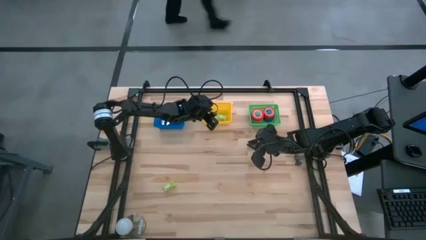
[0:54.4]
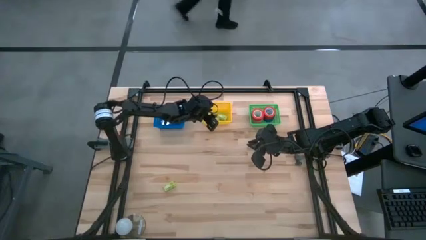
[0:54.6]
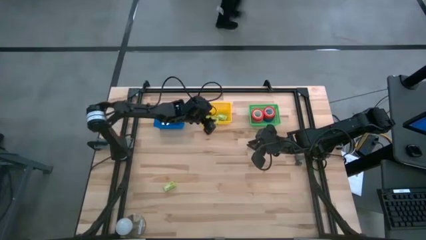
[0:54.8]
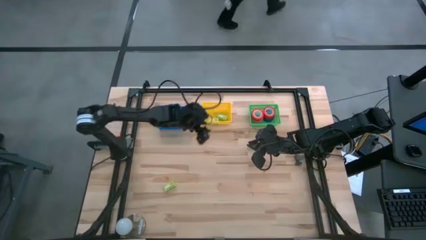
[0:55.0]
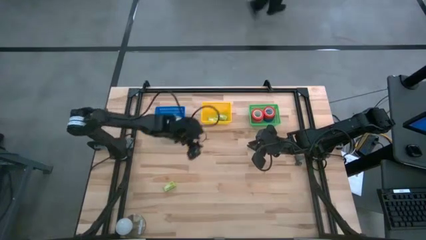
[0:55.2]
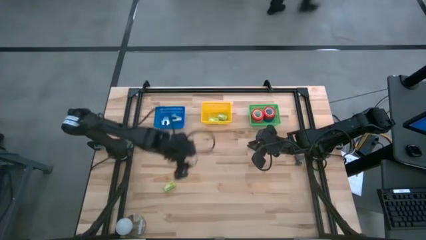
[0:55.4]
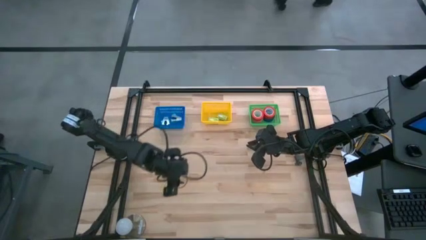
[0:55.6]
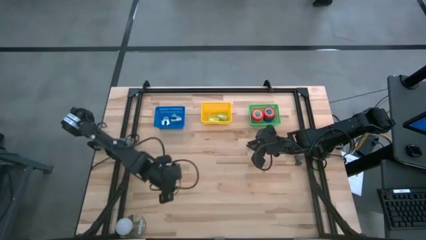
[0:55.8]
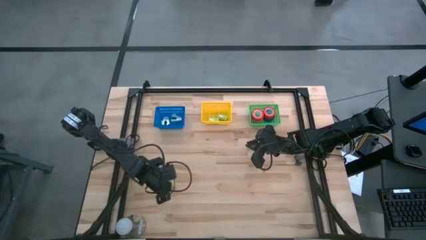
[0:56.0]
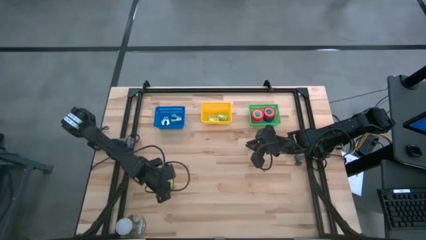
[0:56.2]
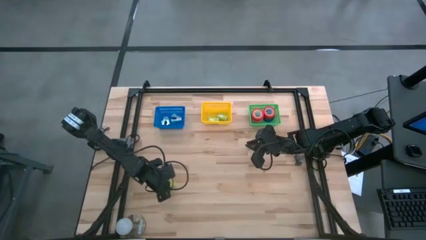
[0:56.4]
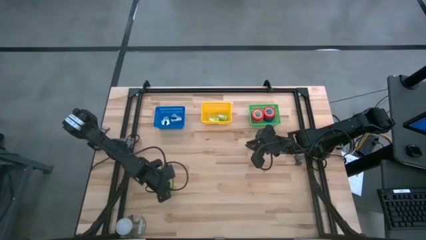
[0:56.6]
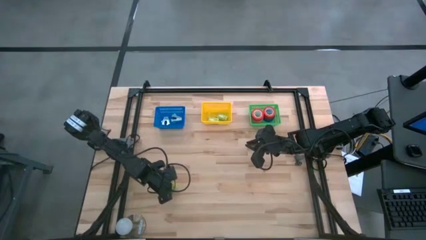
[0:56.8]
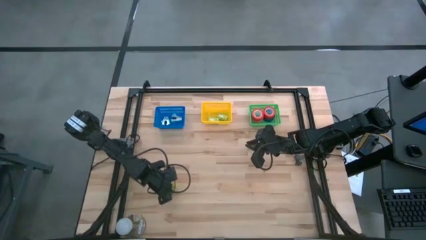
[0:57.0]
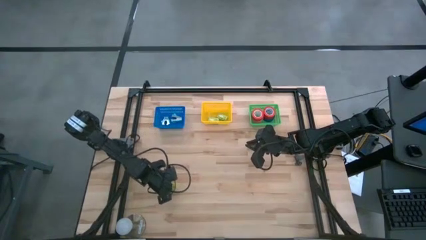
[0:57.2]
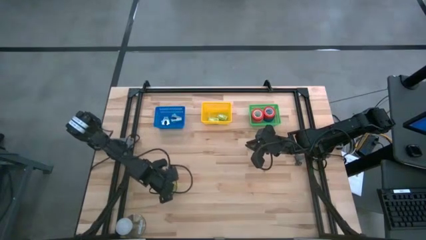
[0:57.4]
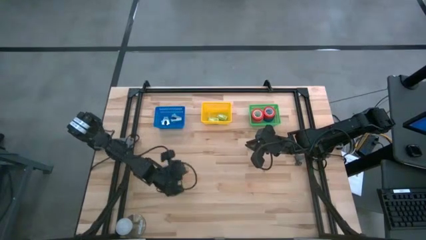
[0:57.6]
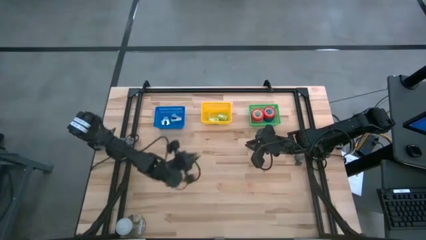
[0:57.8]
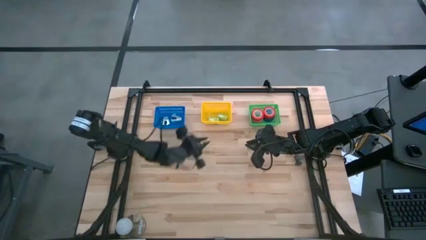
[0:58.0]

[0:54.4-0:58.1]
Task: Pick and place Stapler, Stapler remover, tape
Put the green staple box into the yellow basket

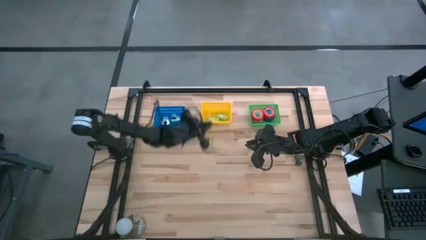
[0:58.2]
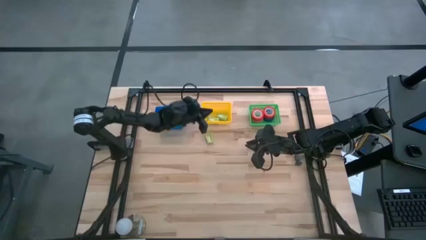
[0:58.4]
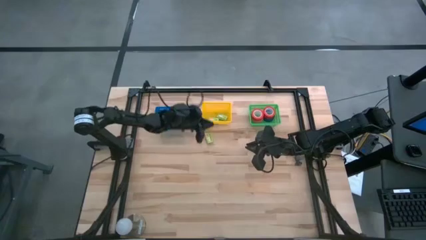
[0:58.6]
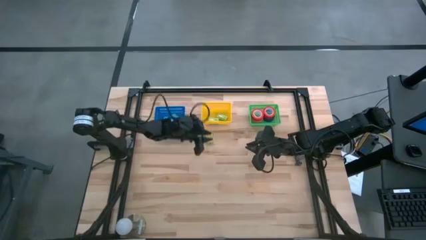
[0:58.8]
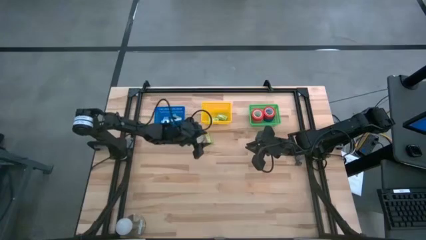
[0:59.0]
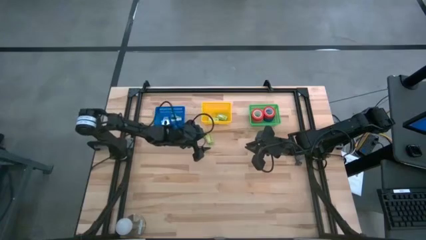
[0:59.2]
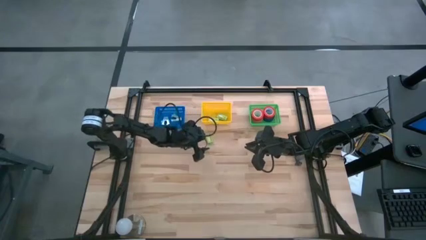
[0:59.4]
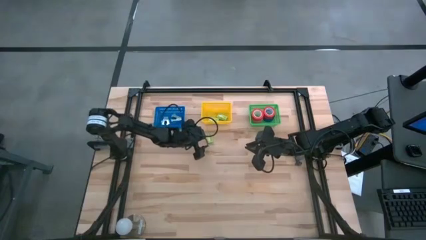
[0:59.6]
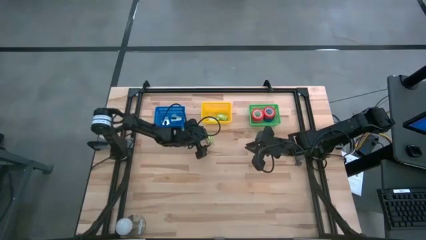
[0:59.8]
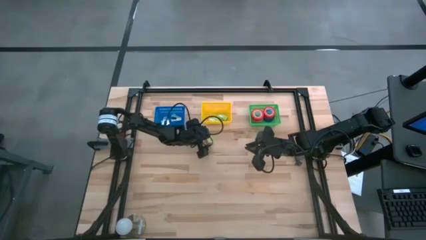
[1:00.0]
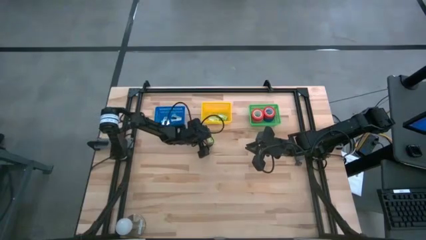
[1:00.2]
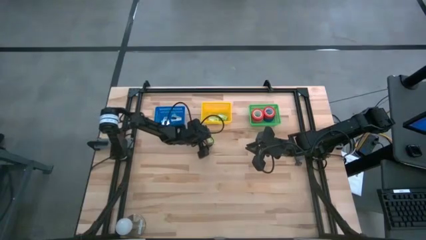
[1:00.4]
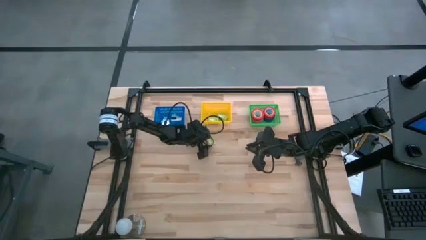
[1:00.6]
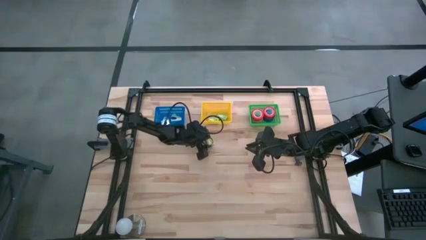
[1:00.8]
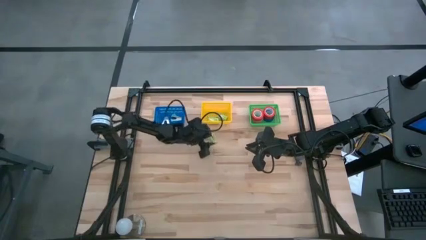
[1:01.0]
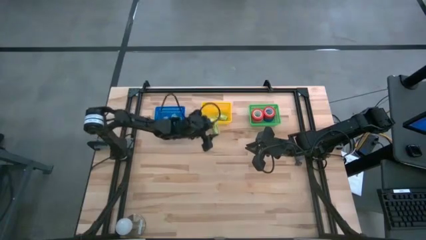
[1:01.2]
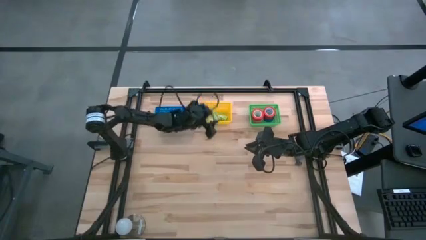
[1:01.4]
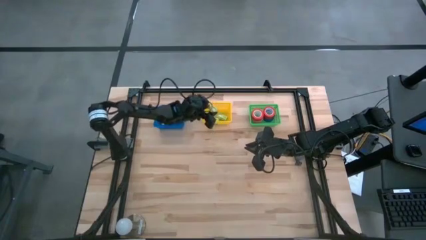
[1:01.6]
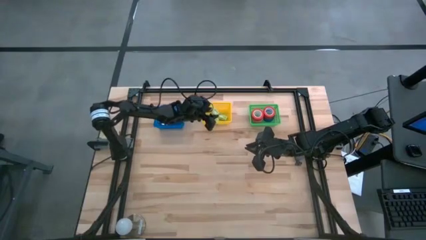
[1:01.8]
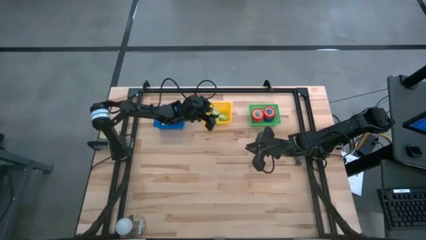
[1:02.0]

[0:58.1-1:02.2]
Put the green staple box into the yellow basket

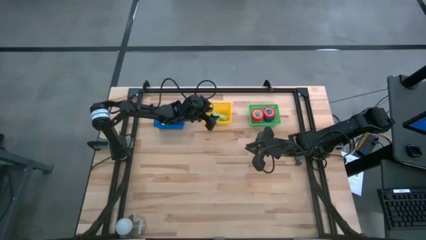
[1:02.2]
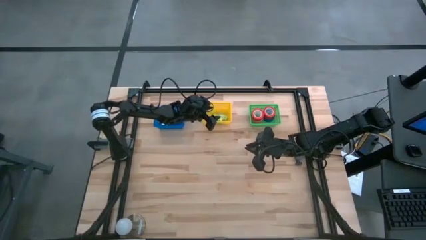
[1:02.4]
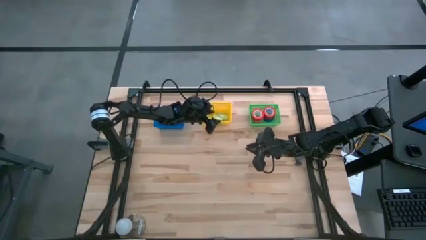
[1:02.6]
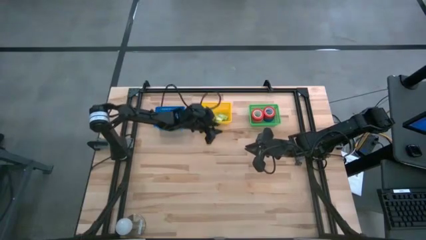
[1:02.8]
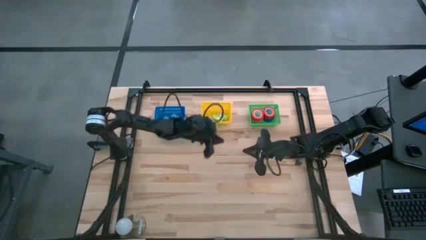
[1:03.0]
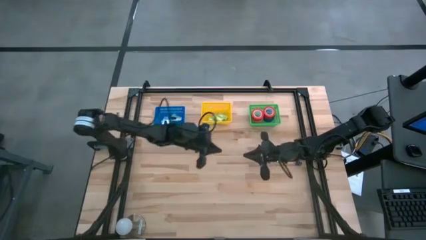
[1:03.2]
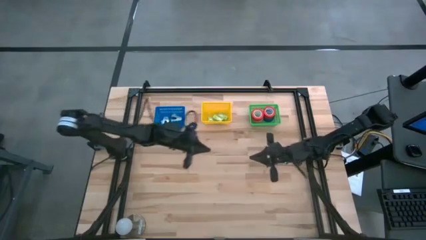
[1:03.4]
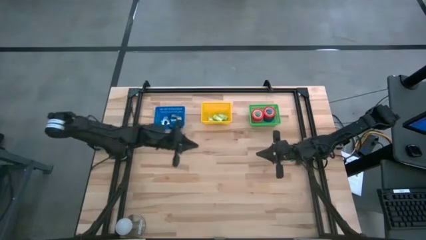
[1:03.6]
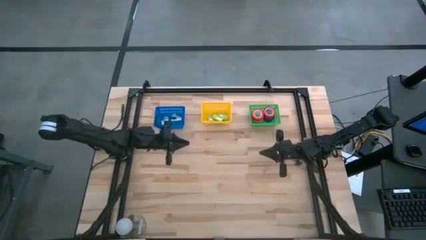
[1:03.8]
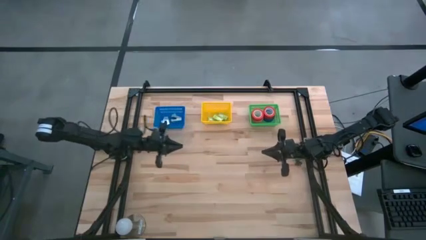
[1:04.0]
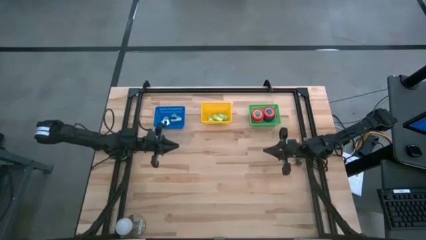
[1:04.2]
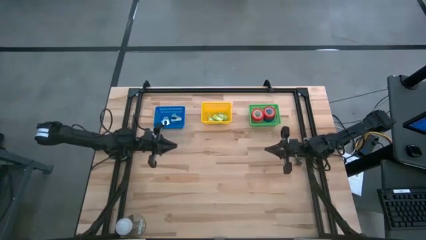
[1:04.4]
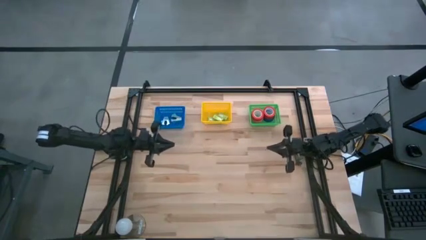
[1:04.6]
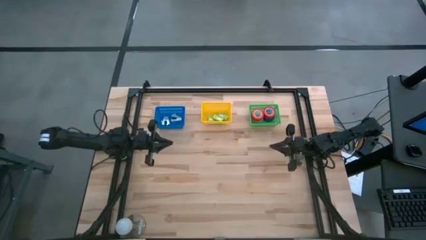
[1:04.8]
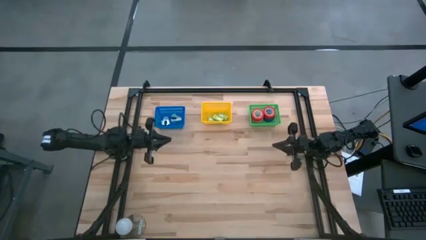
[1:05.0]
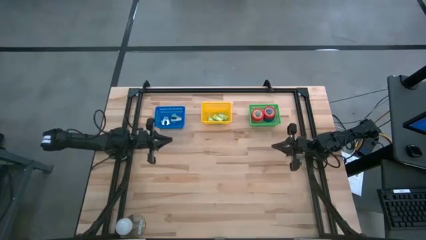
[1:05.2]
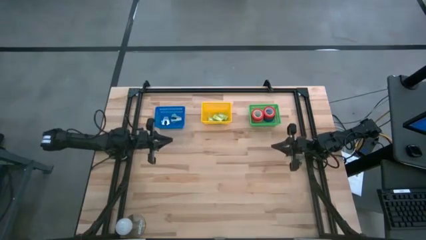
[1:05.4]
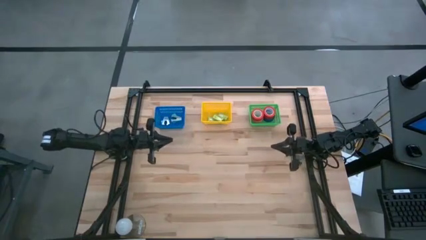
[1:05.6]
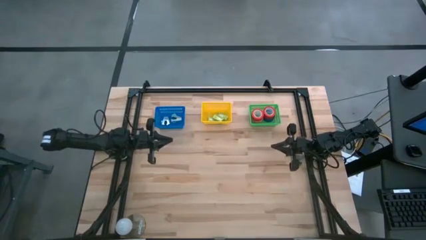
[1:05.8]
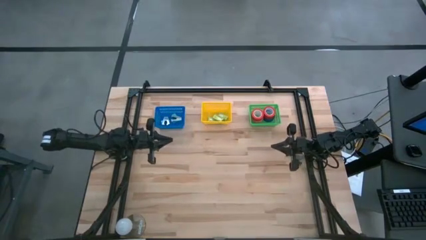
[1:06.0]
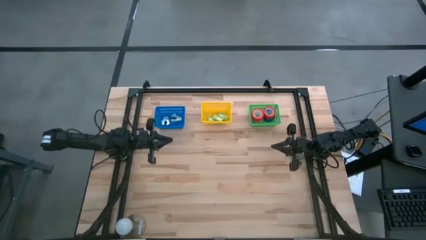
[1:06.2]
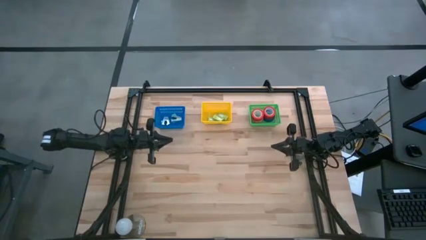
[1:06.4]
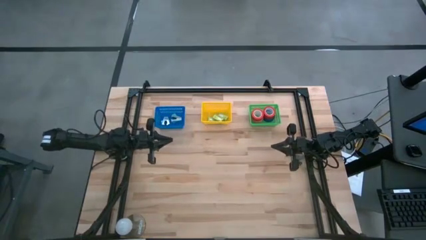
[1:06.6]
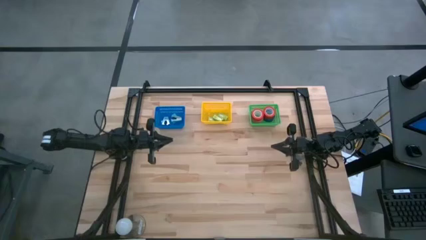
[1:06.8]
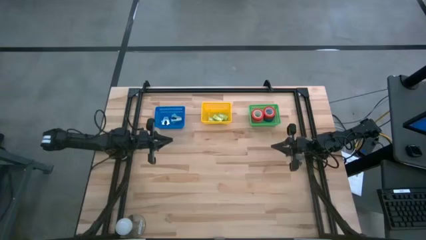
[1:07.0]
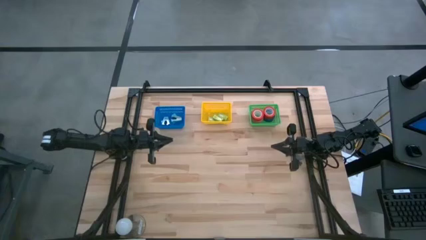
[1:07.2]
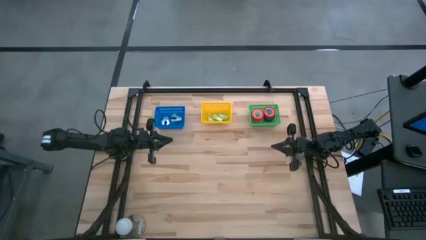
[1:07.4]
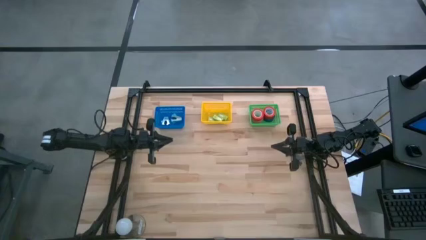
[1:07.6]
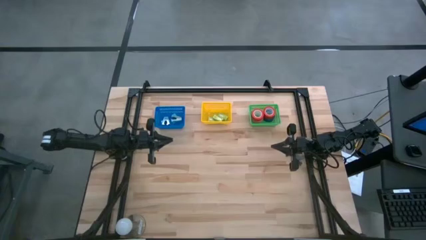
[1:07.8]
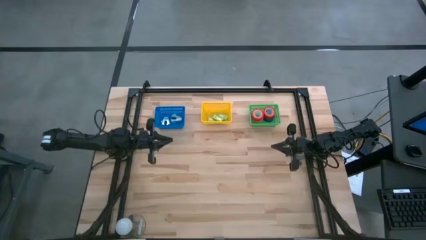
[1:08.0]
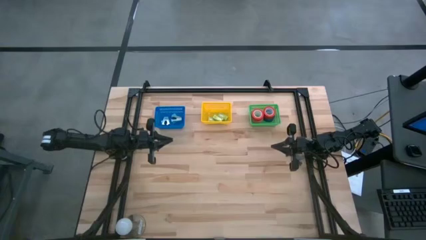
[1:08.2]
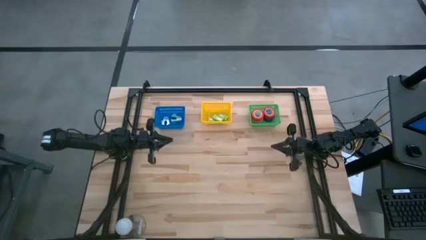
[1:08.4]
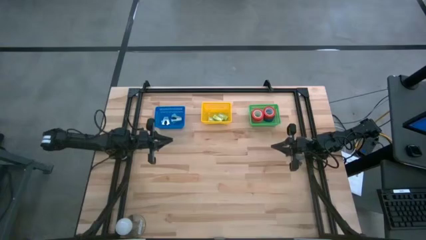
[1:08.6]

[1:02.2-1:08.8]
Return to Home Position
